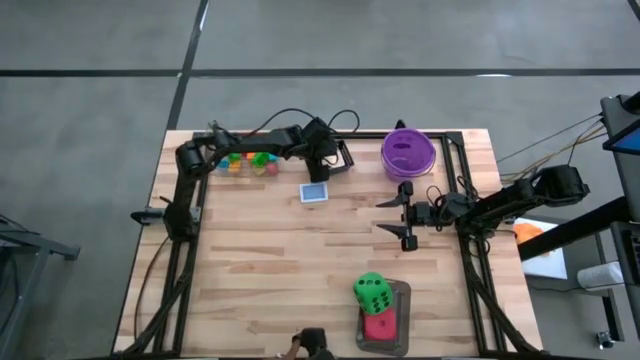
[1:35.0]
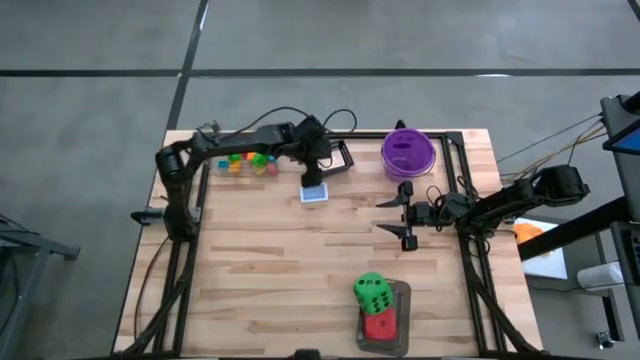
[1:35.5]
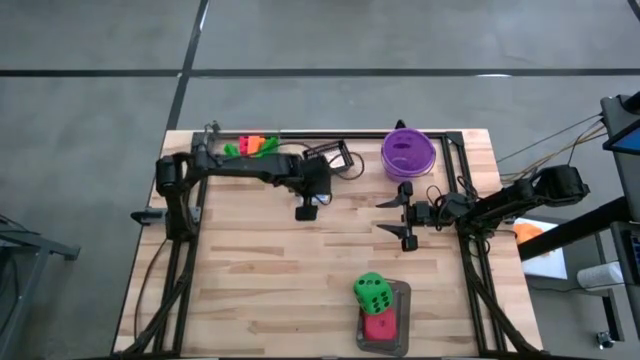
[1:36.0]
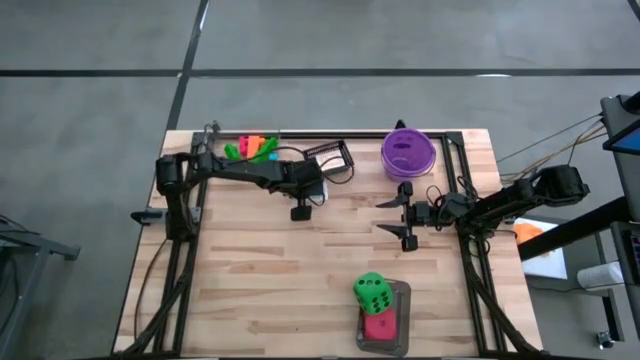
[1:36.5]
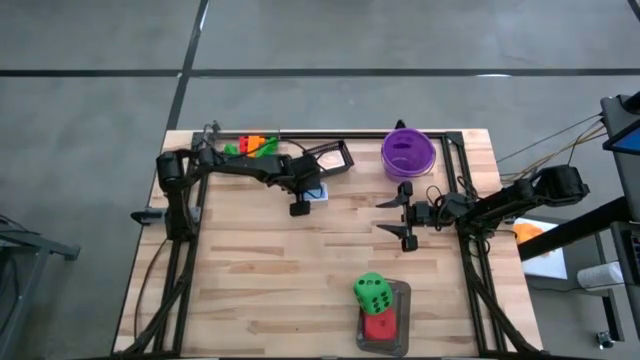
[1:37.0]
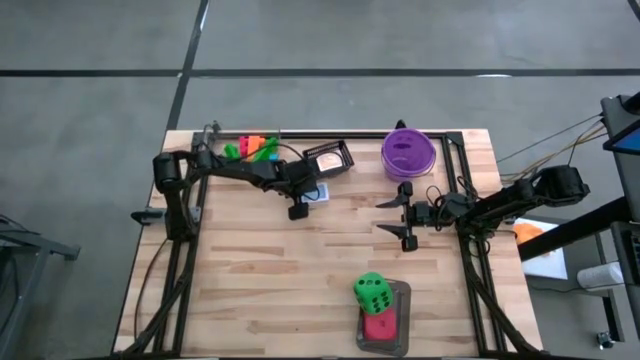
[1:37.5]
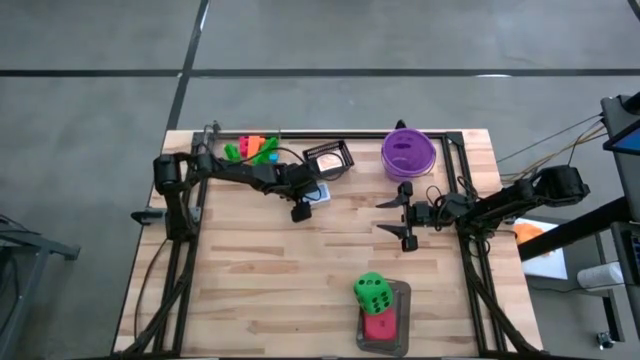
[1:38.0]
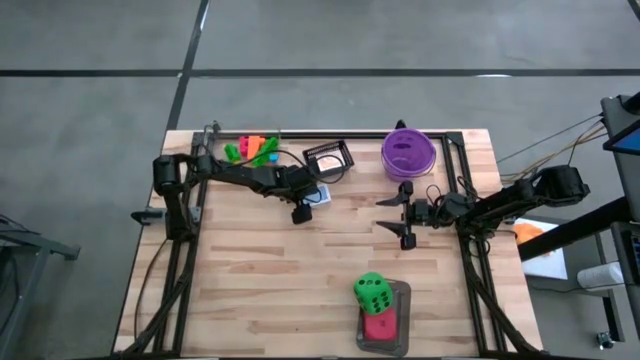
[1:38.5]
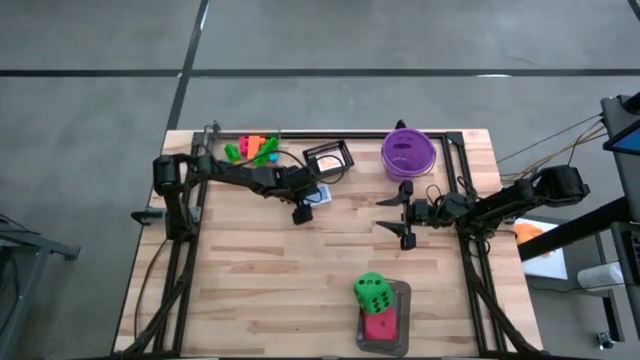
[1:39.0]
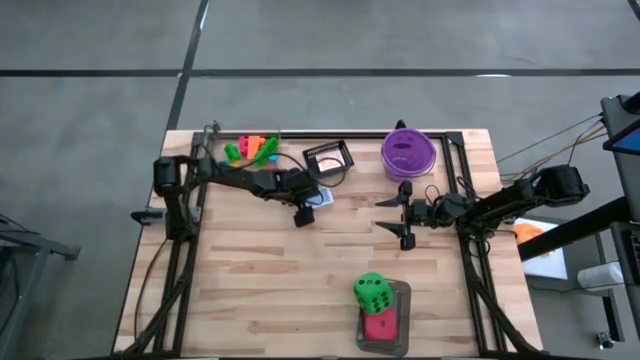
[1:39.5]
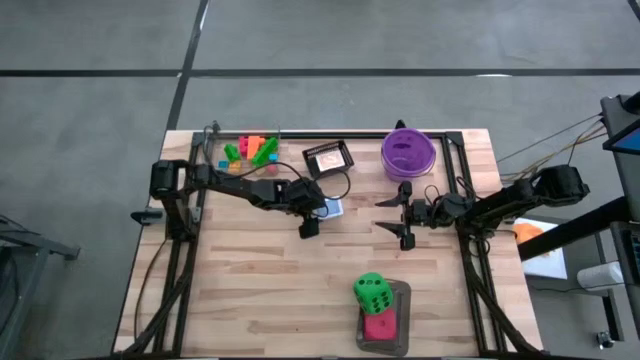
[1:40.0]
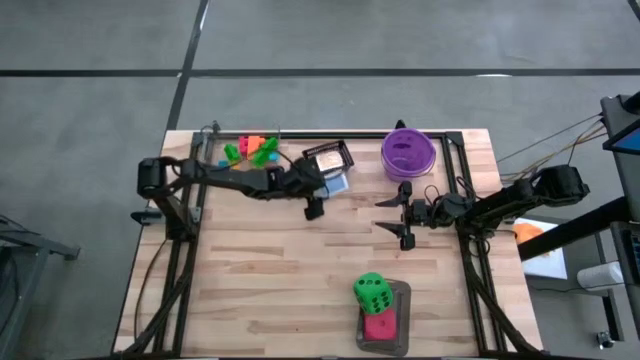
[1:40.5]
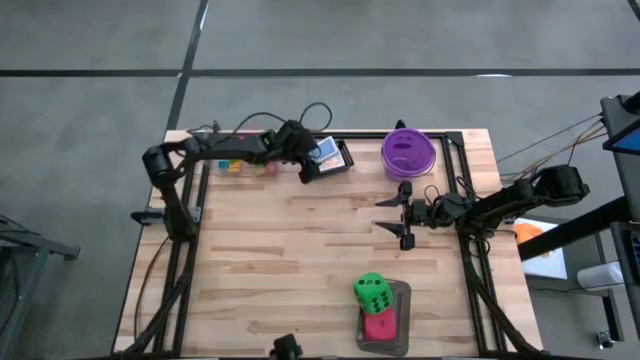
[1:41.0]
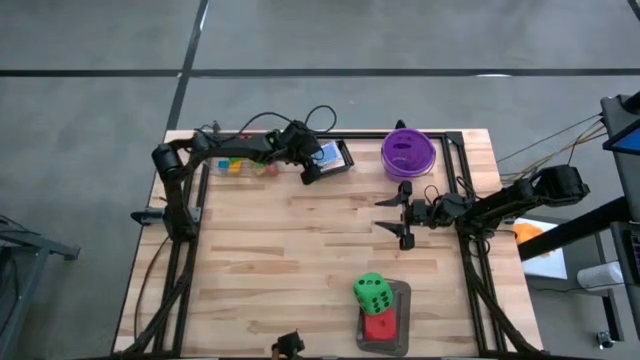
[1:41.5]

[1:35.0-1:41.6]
Task: Pick & Place Toys
Put the blue deck of cards into the black basket

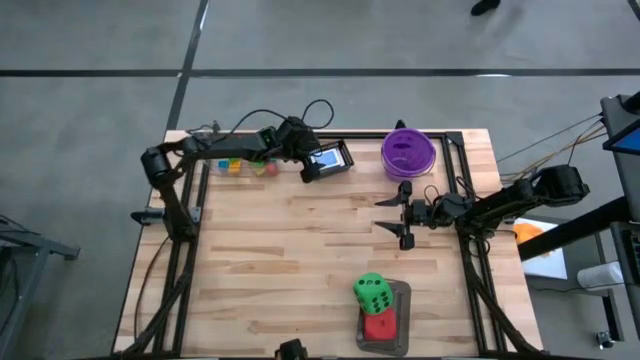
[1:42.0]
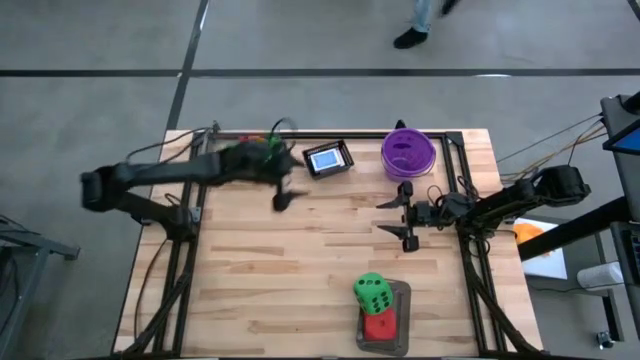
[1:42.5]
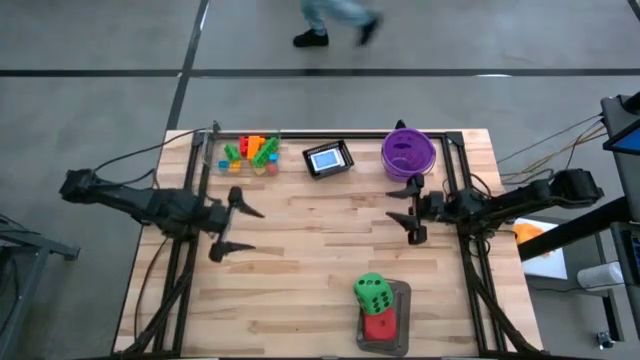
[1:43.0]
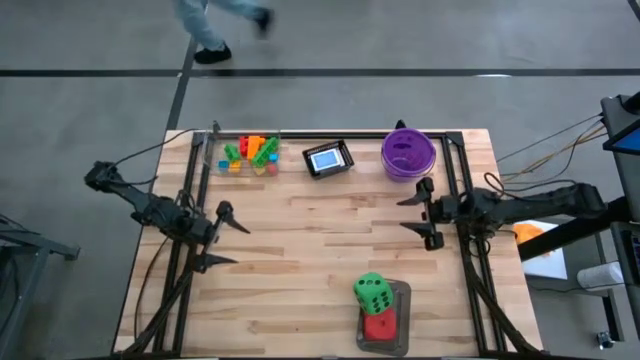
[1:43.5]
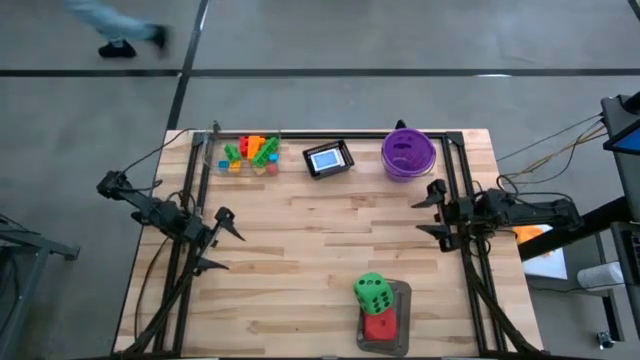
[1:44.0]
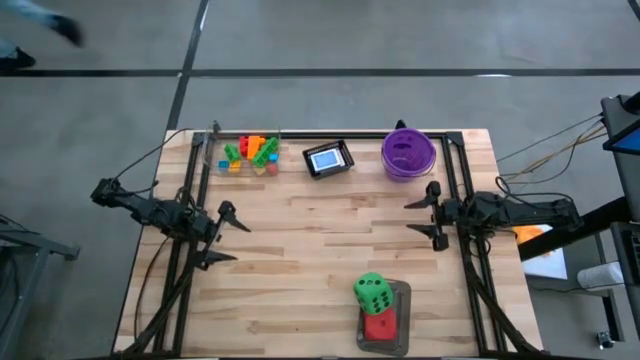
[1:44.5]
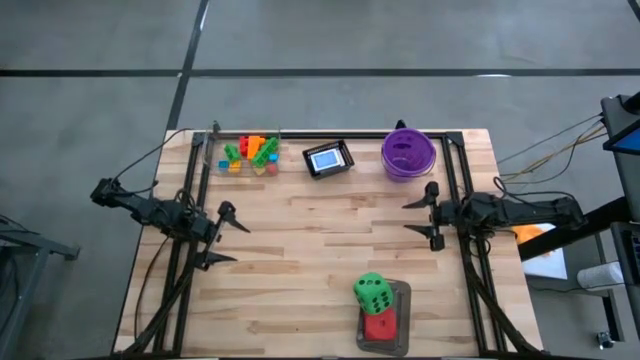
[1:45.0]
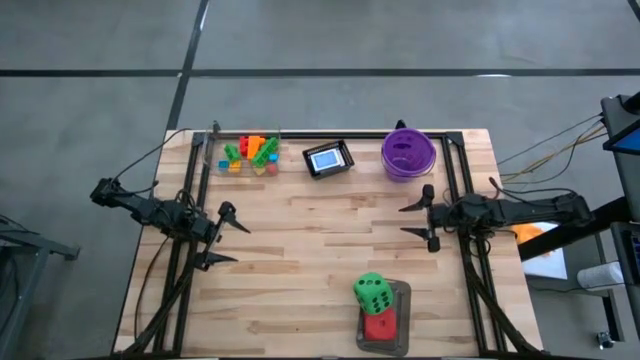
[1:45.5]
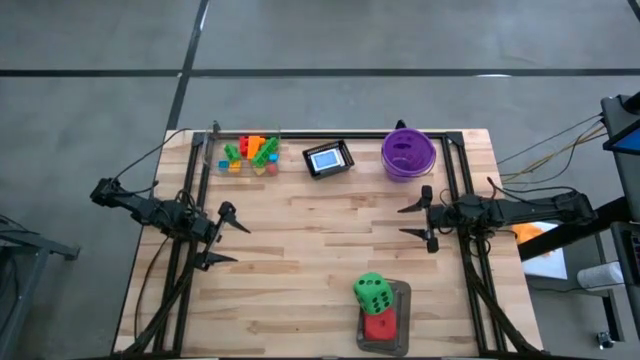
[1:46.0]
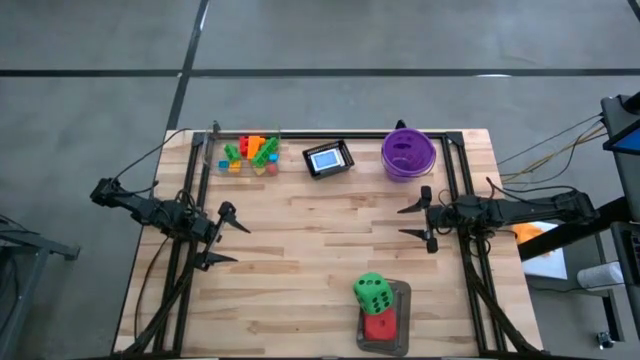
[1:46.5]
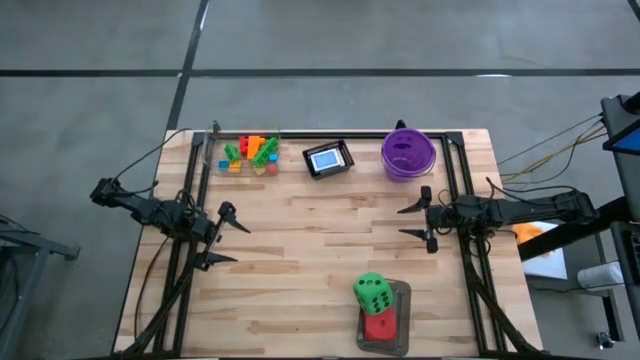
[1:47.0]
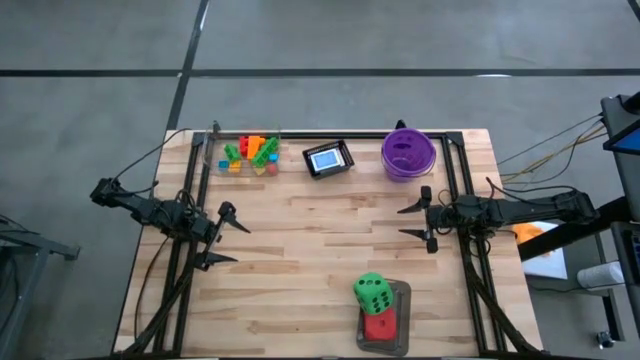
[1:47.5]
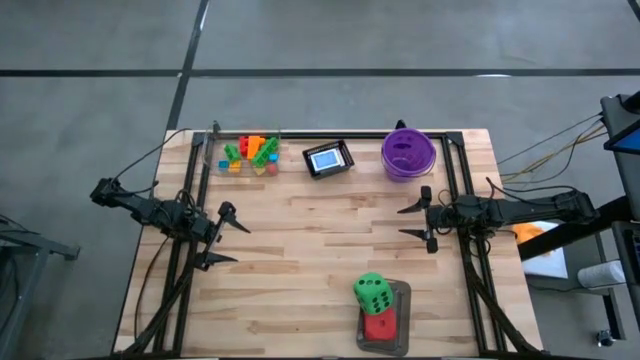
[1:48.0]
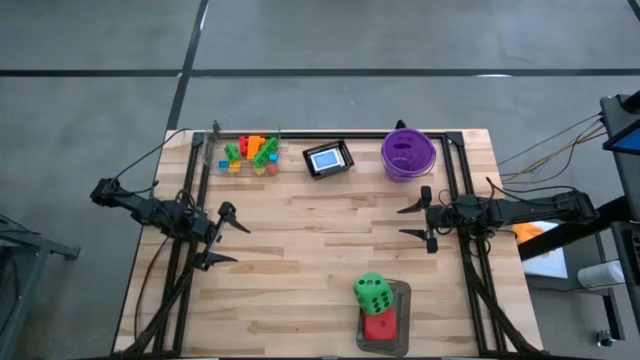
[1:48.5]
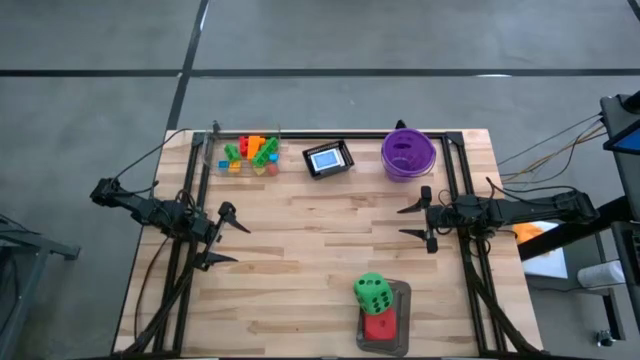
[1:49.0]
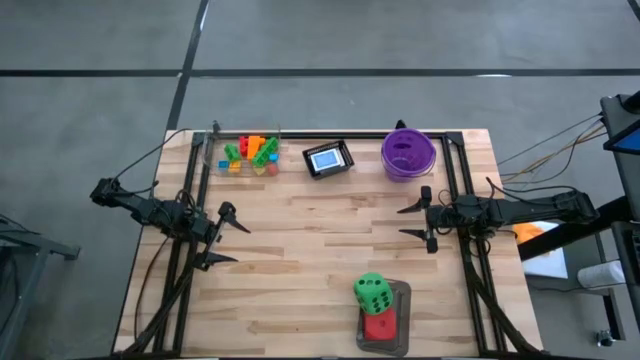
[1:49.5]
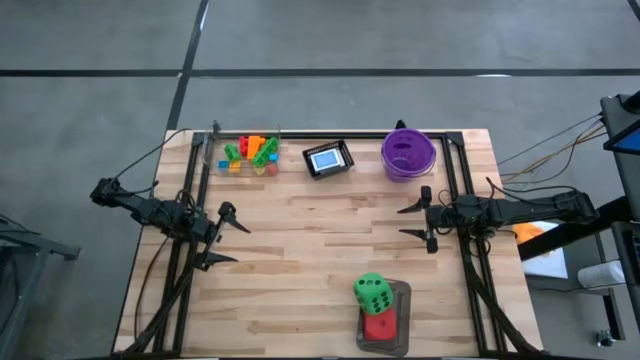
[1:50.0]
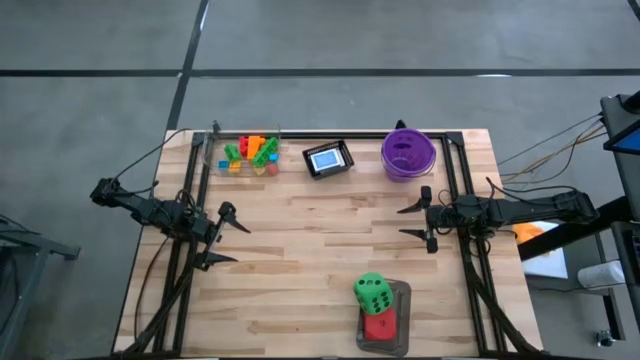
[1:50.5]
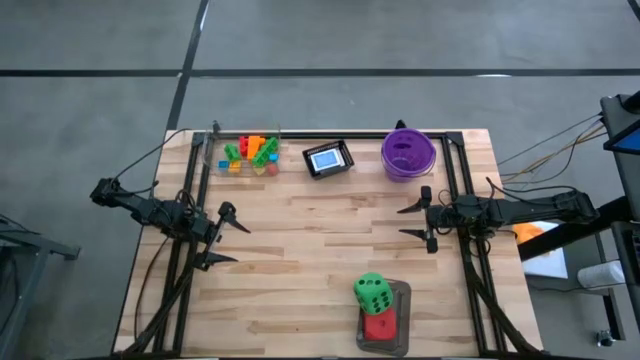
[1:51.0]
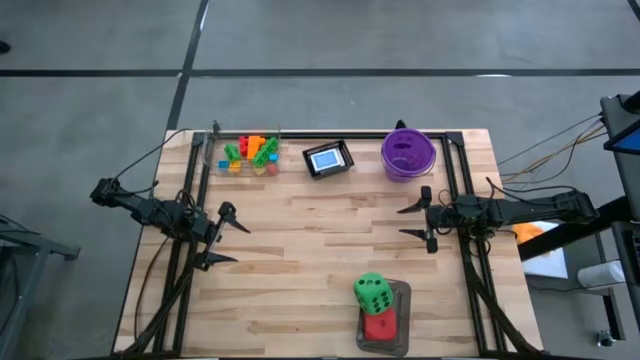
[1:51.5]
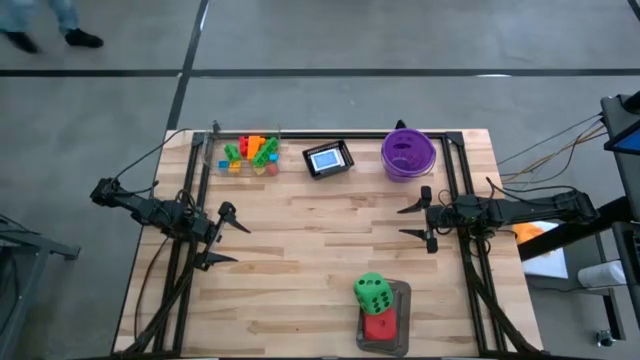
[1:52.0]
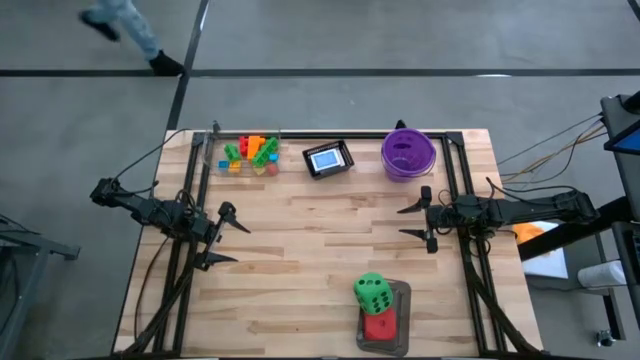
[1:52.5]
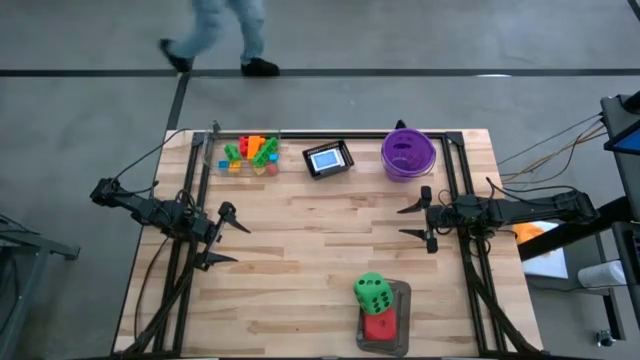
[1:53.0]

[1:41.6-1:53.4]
Return to Home Position

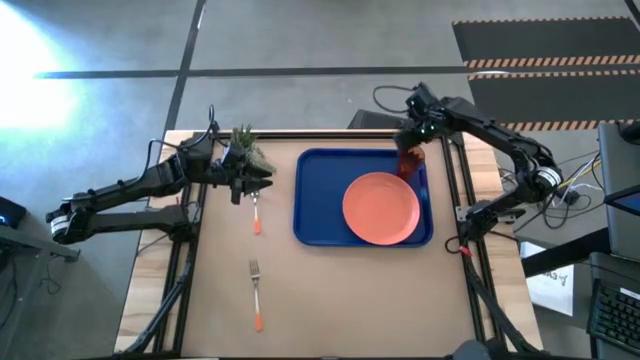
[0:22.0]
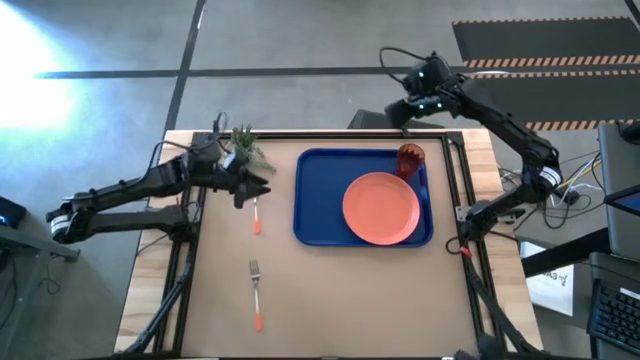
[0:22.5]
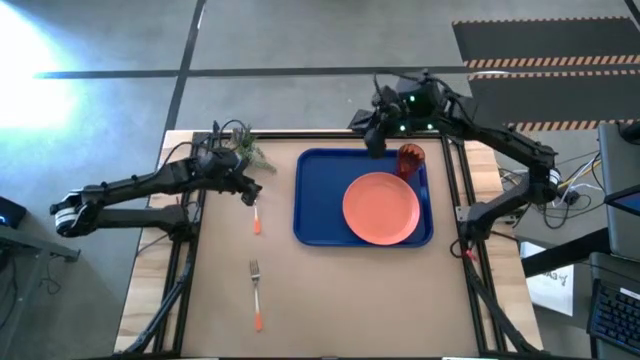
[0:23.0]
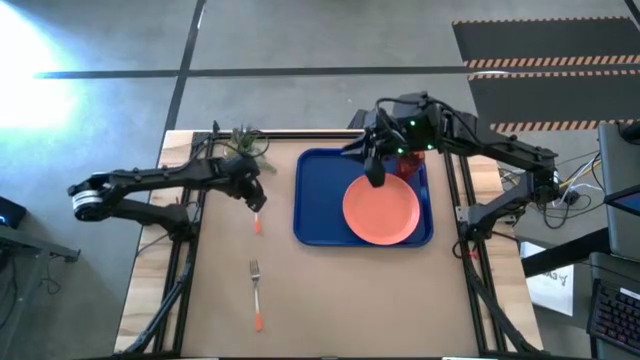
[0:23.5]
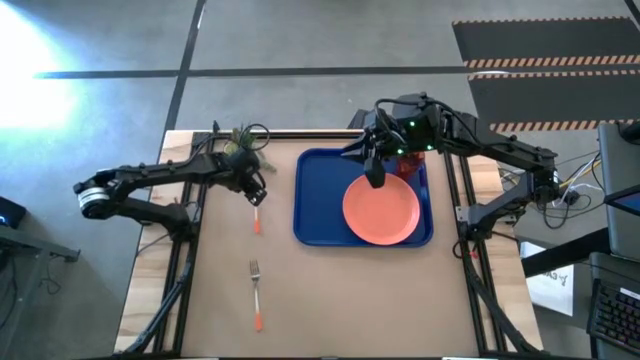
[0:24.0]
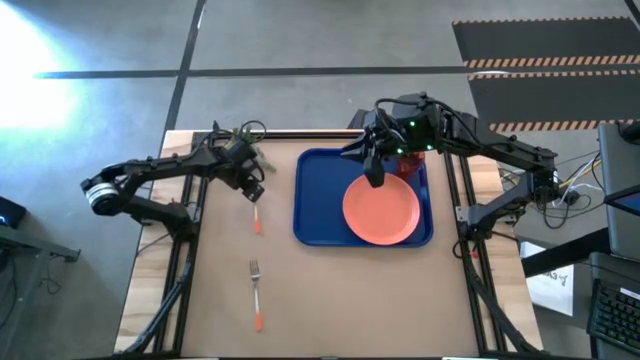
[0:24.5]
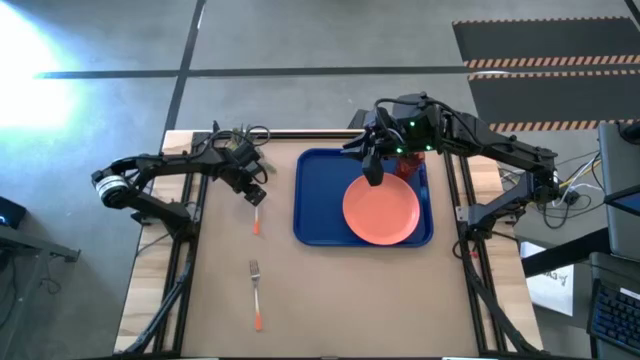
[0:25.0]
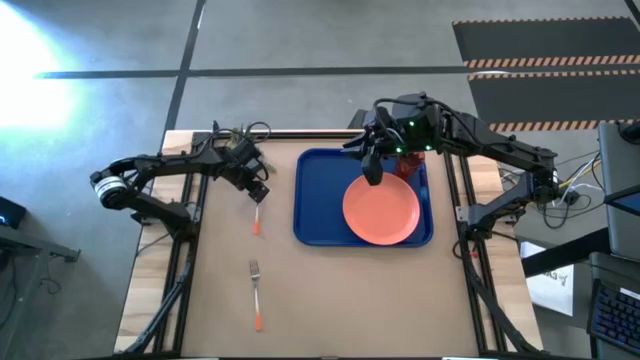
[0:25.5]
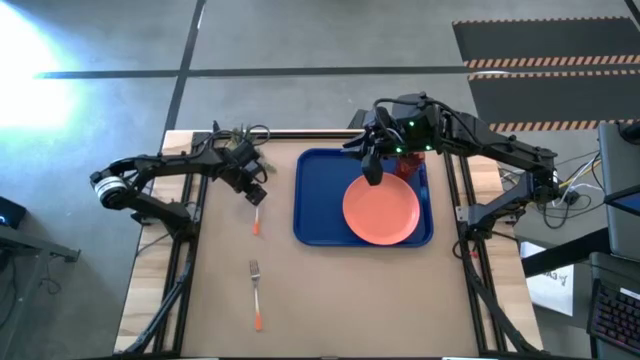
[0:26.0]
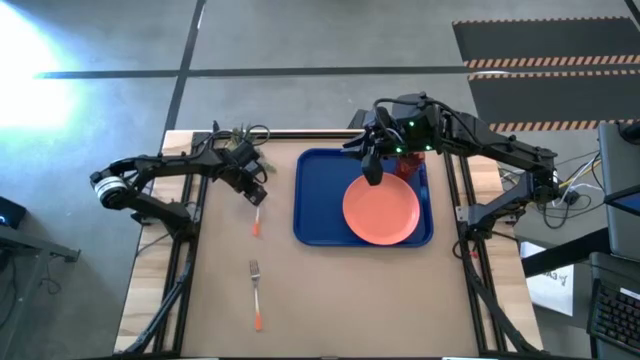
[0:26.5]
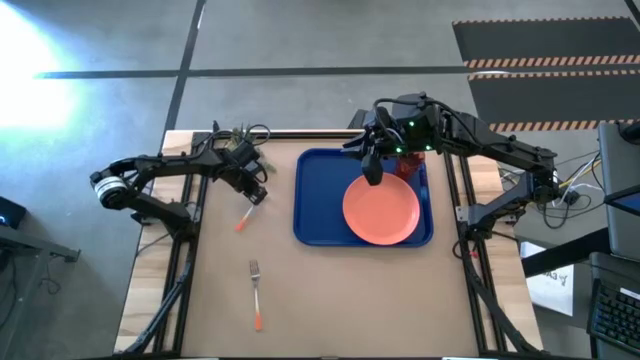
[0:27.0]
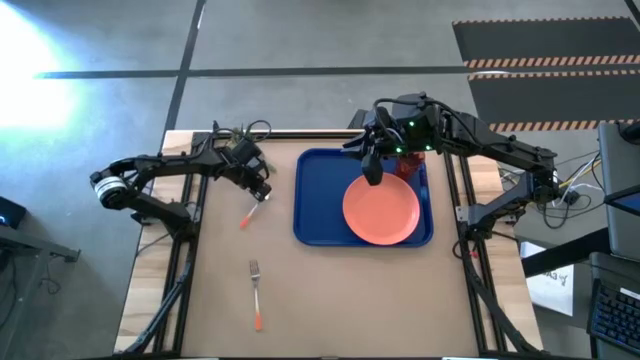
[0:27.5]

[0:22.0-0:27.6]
Task: Pick and place plate/cup/fork/spoon on tray
Put the orange spoon on the blue serving tray to the left of the orange plate
